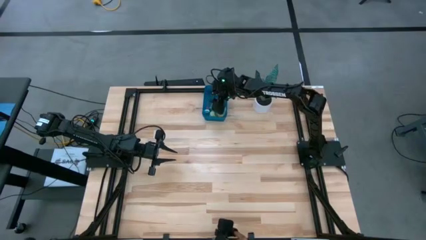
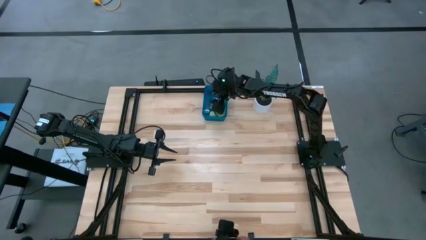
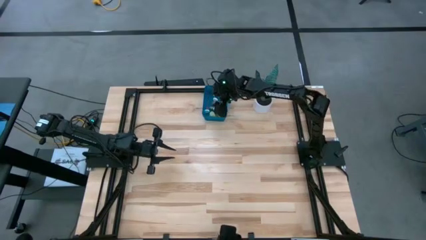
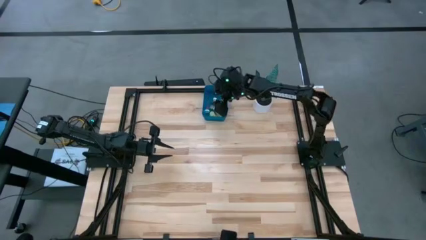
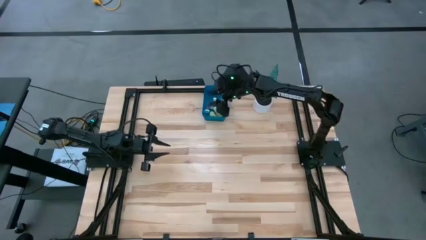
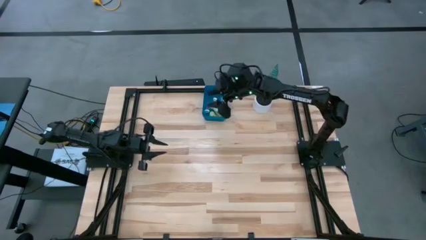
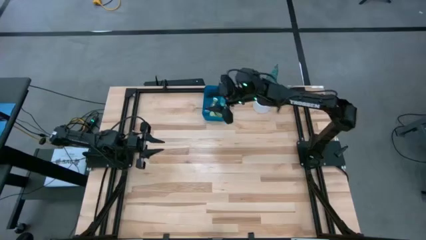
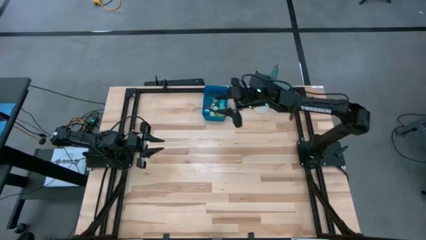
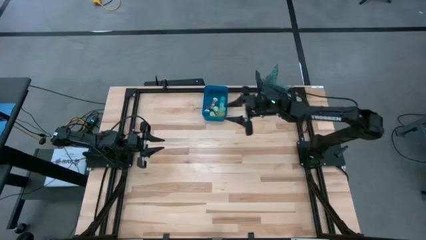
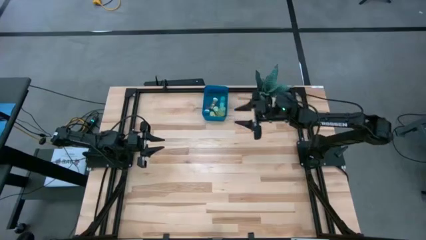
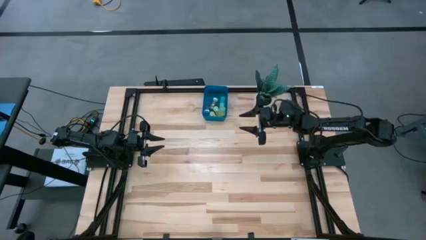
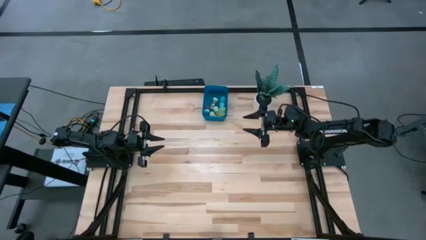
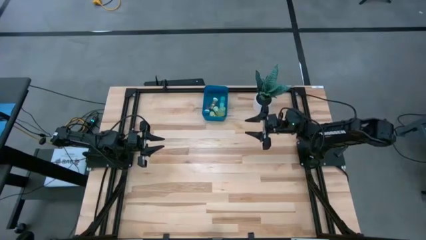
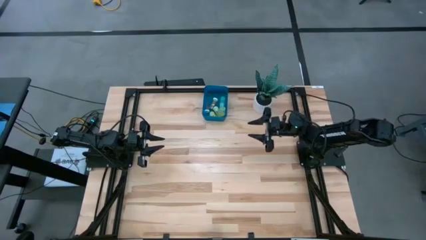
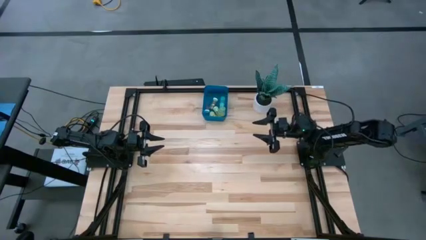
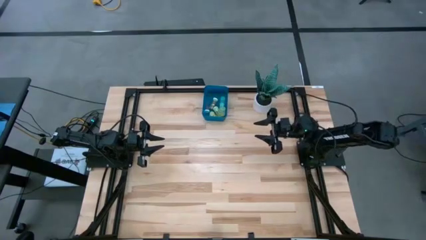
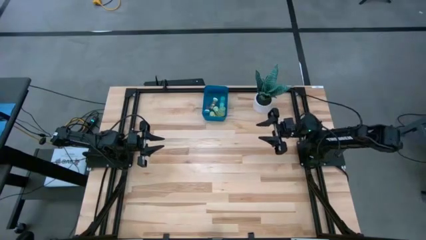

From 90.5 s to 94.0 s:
Task: Pick and place pill bottles into a basket
Return to Home Position

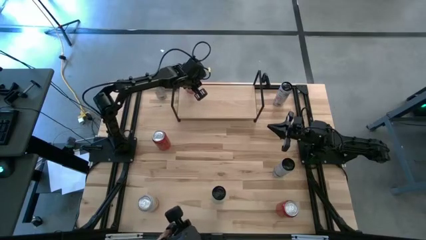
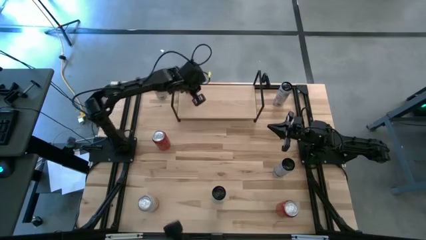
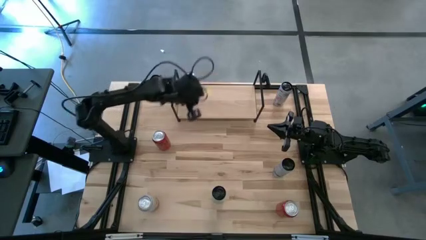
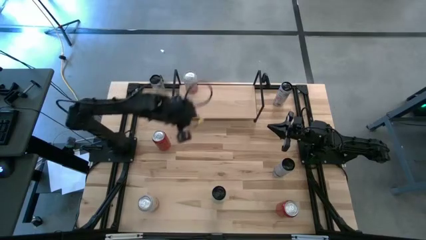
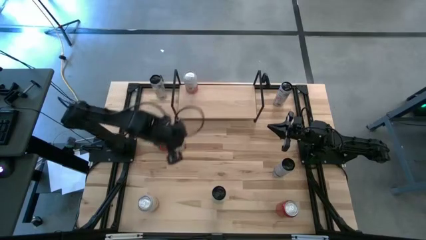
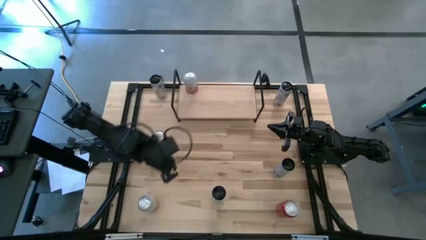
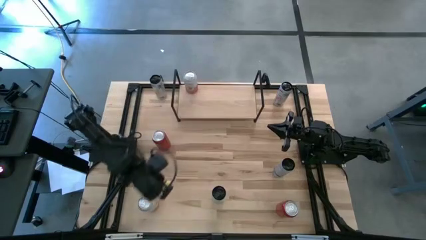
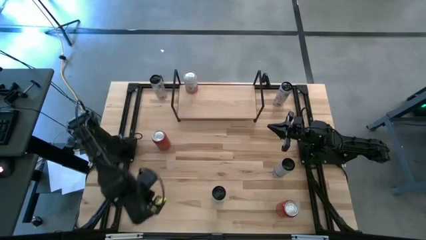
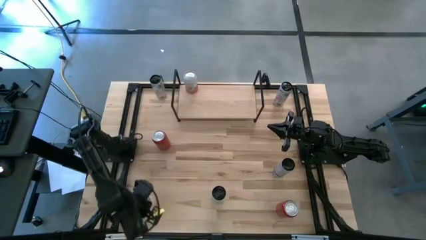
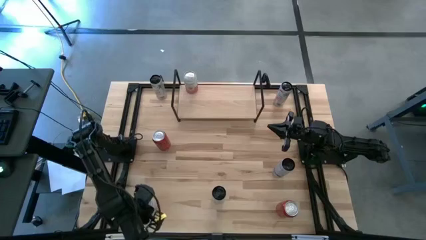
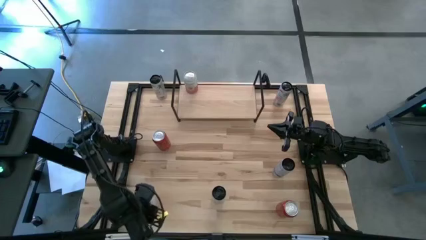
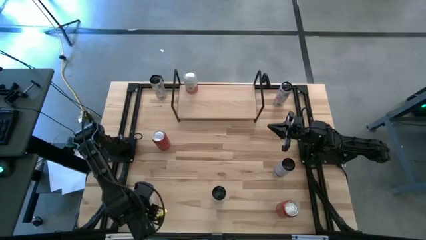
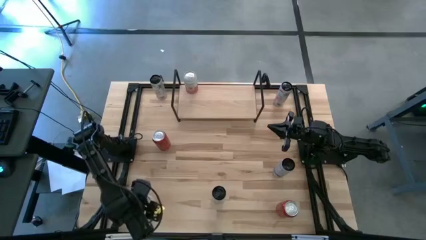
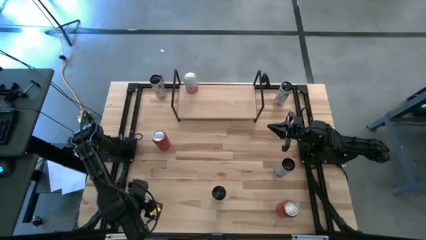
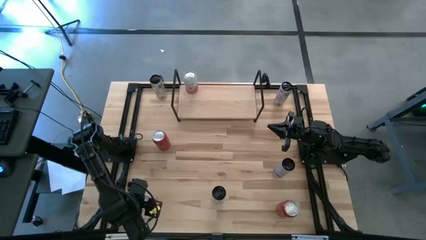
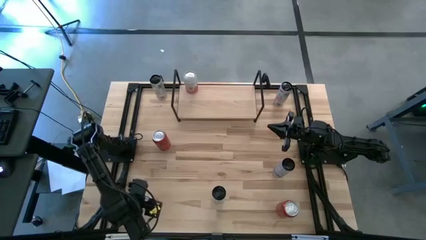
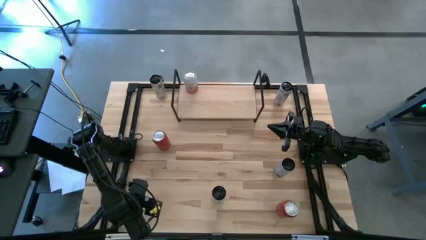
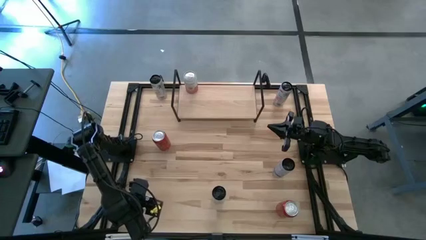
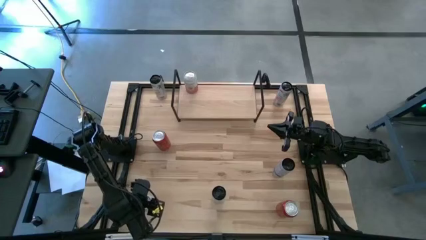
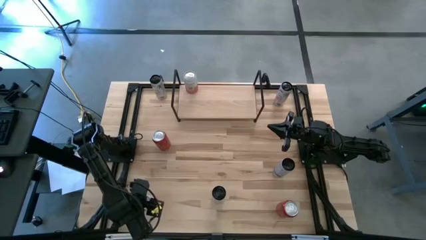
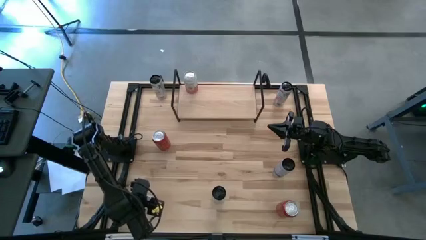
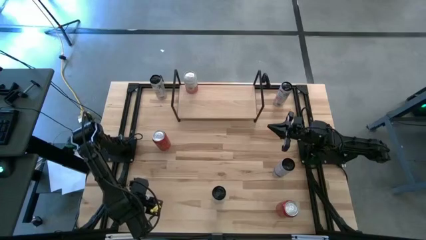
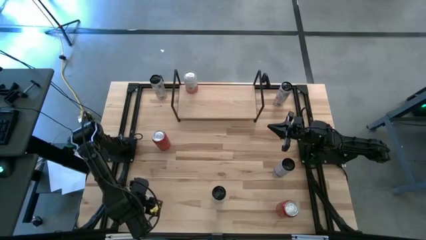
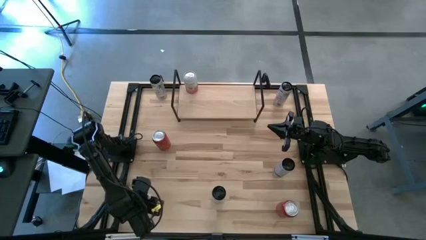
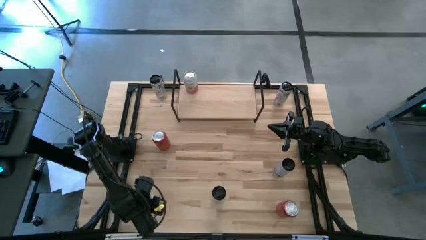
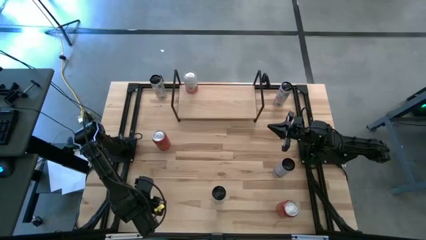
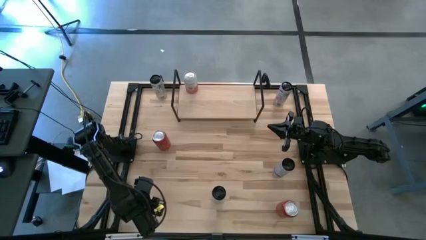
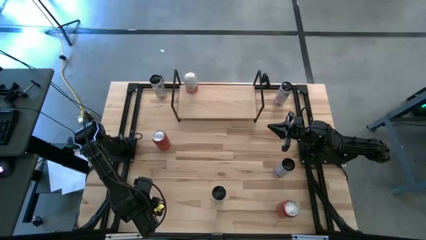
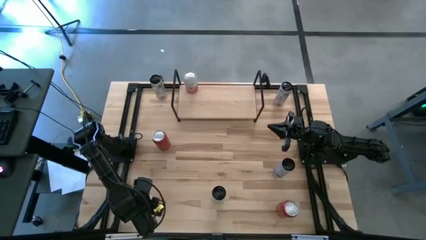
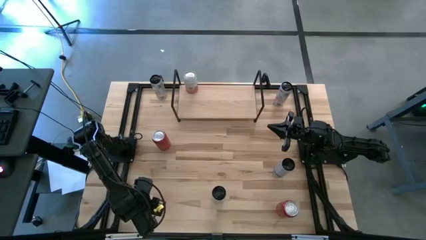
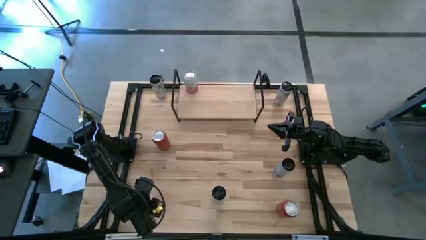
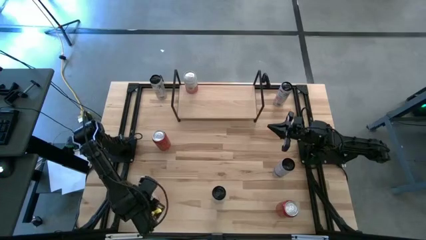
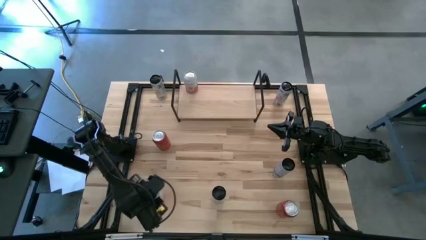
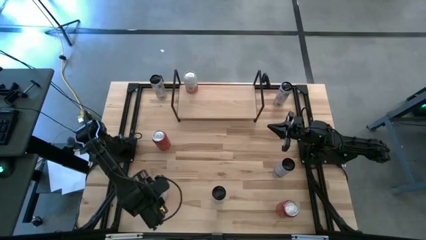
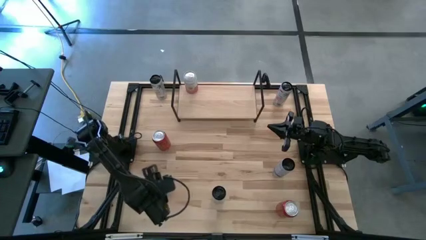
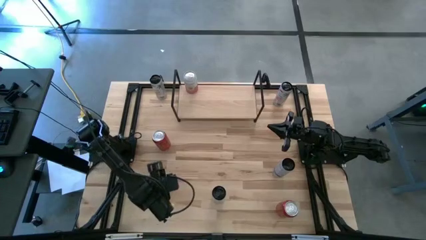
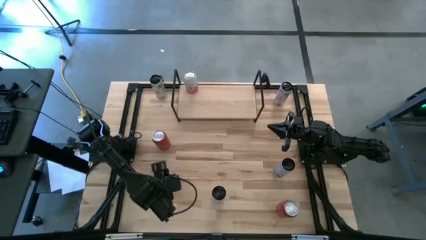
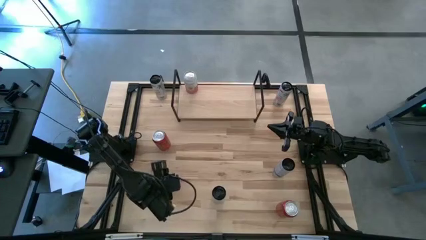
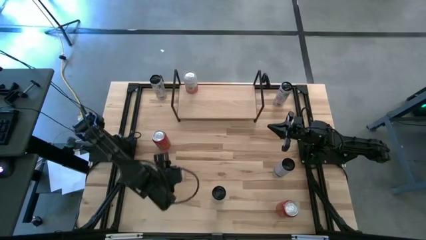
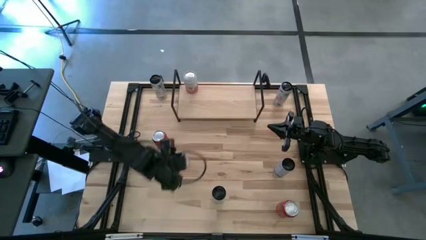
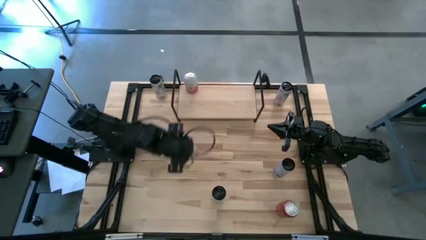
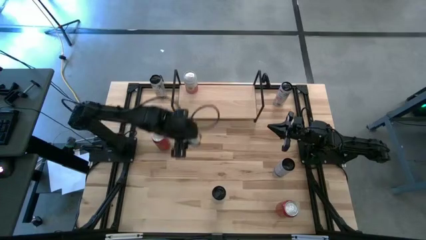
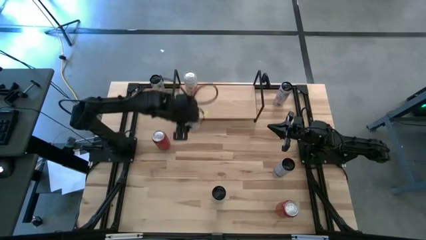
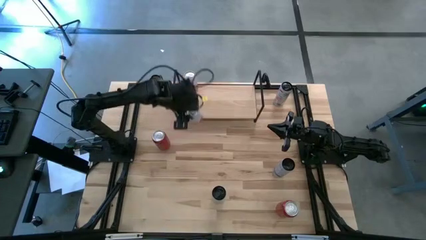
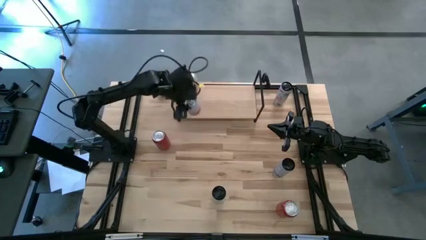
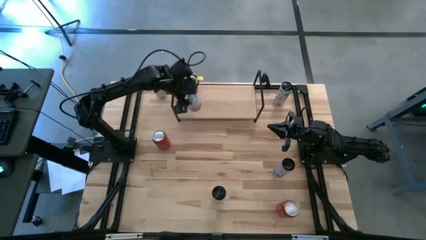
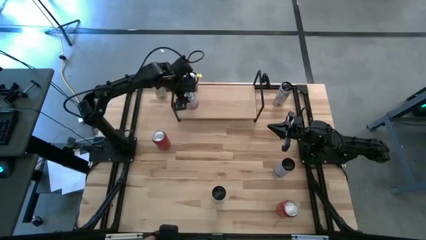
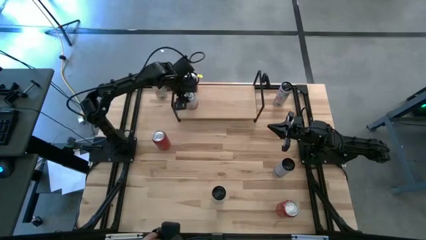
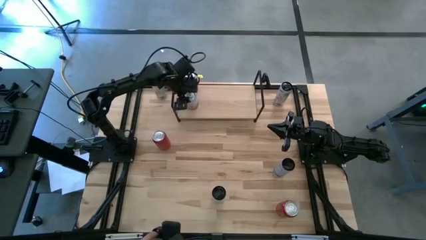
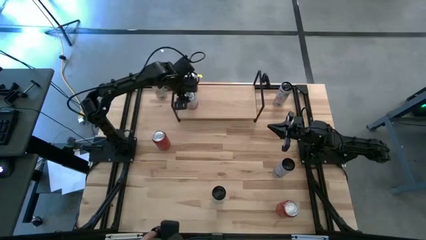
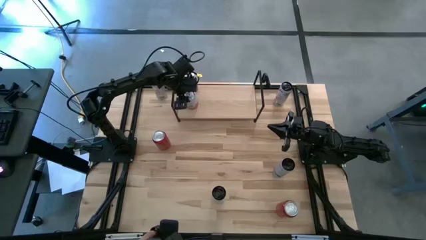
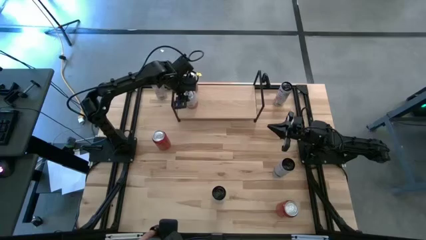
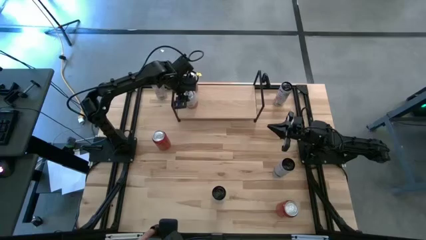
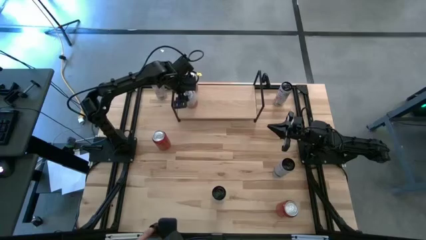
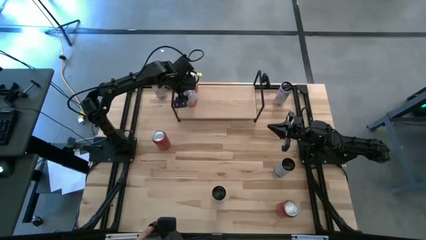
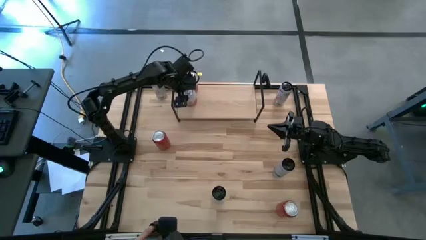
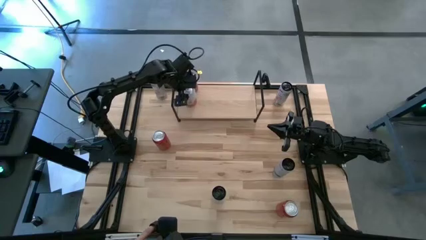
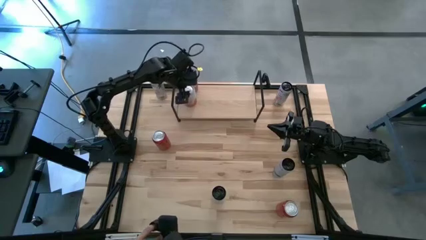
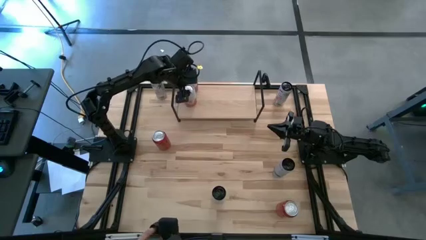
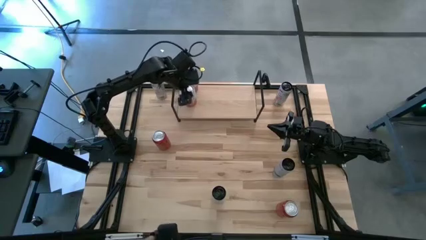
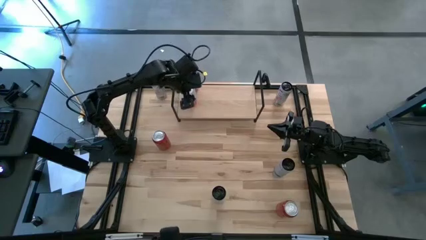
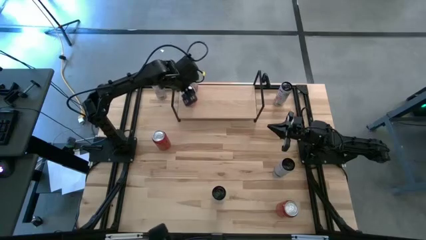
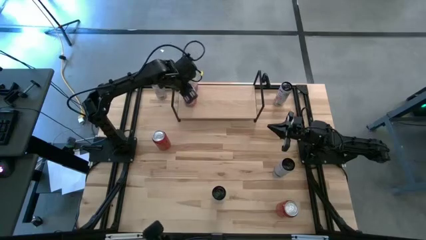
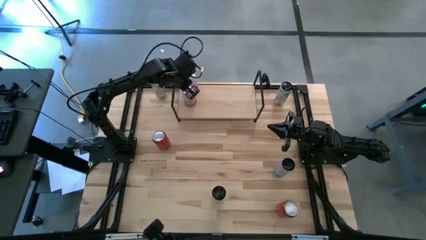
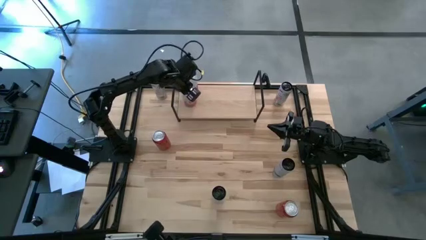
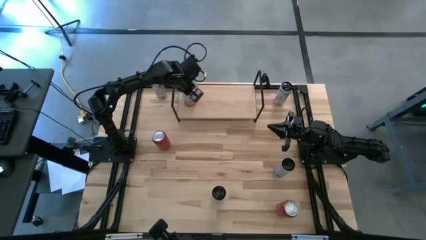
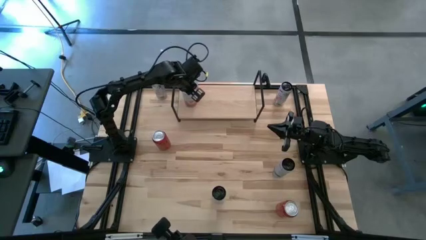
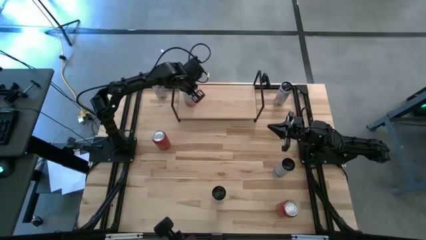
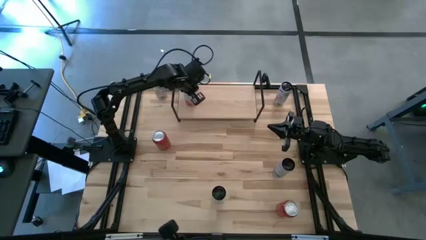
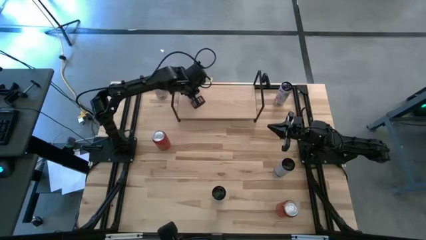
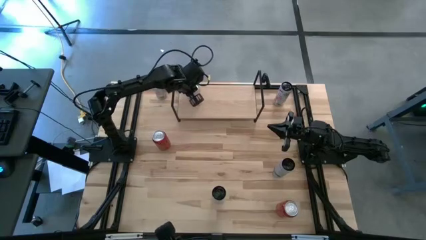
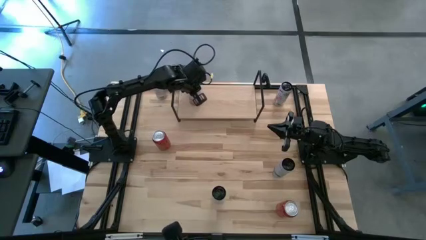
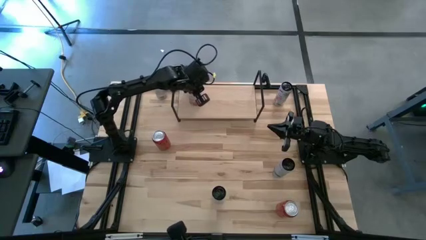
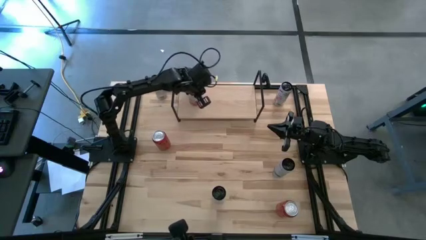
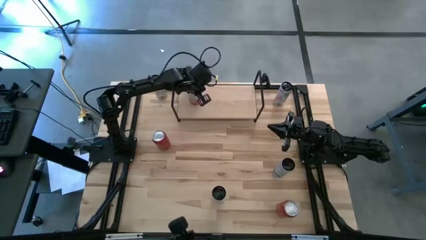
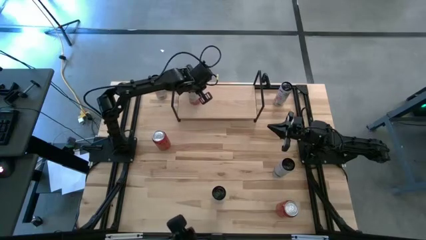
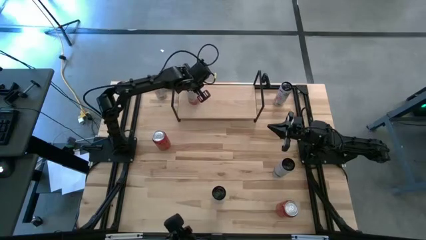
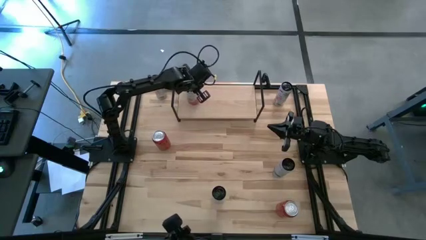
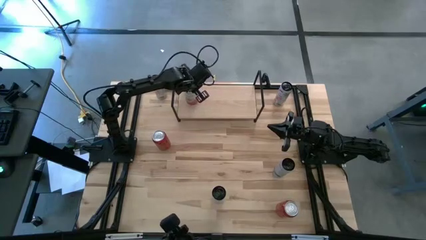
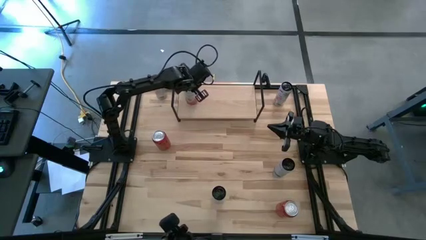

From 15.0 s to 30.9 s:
Task: Place canned beverage on shelf
Put the pink white soda can on the shelf aligned with the other pink white soda can
